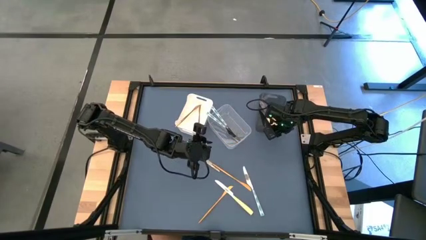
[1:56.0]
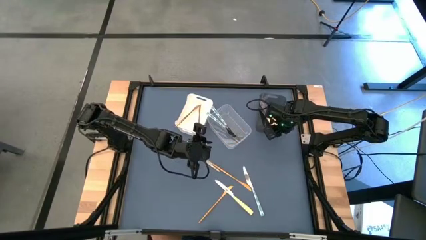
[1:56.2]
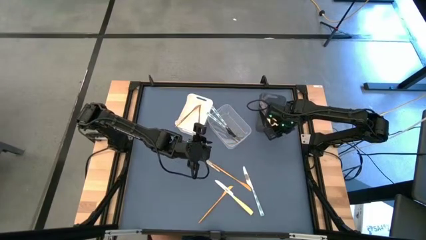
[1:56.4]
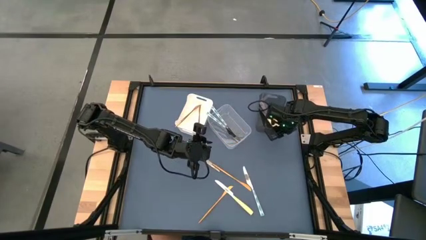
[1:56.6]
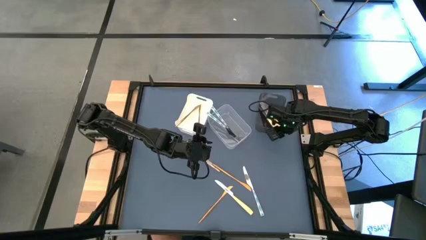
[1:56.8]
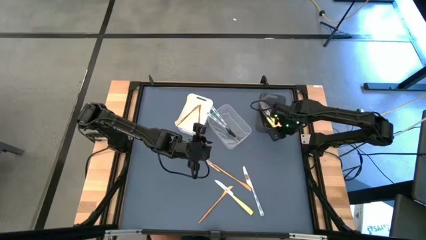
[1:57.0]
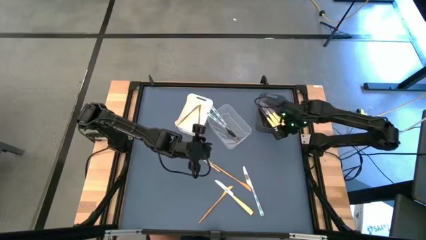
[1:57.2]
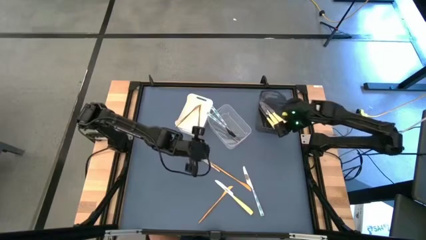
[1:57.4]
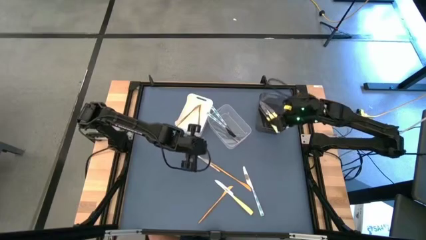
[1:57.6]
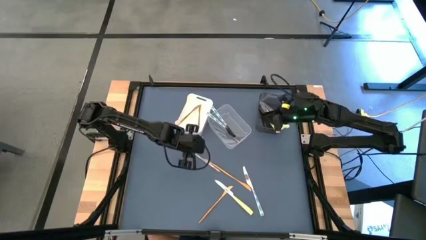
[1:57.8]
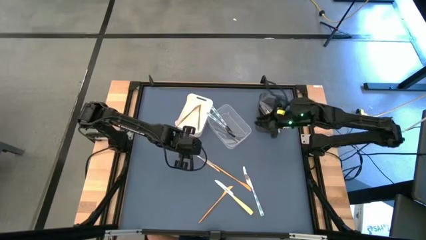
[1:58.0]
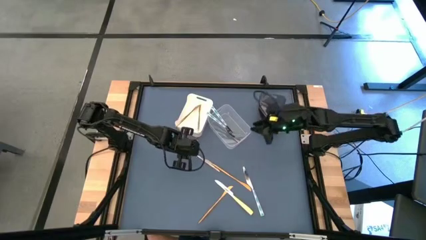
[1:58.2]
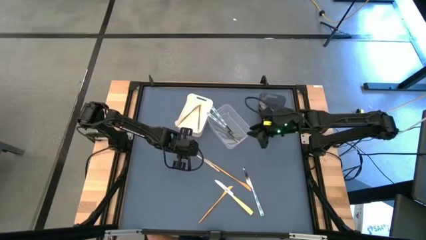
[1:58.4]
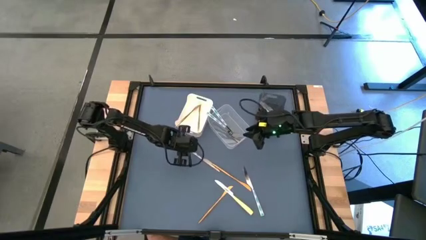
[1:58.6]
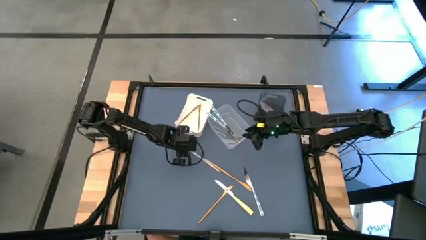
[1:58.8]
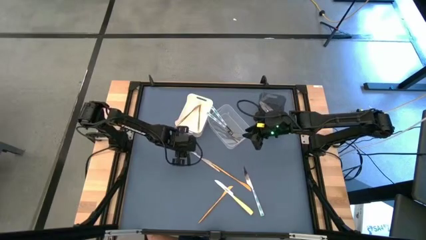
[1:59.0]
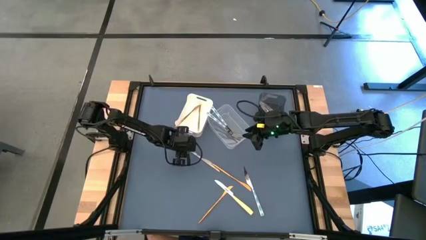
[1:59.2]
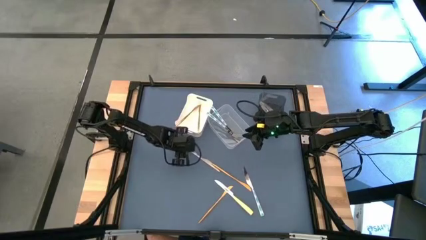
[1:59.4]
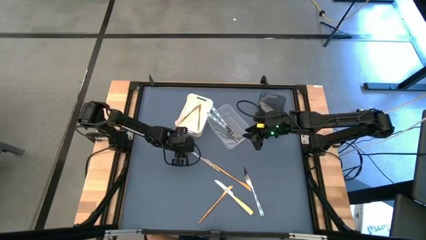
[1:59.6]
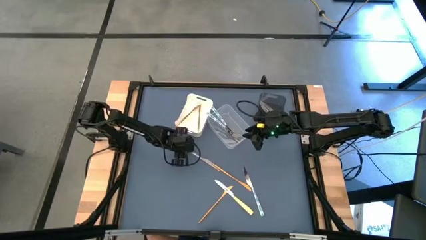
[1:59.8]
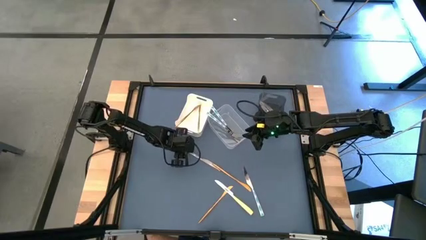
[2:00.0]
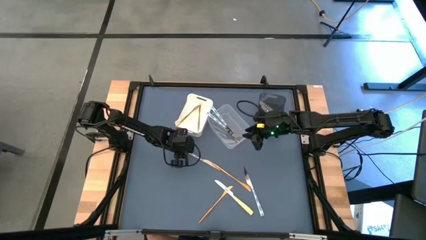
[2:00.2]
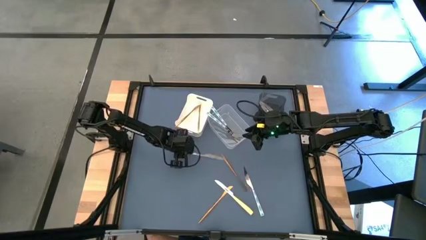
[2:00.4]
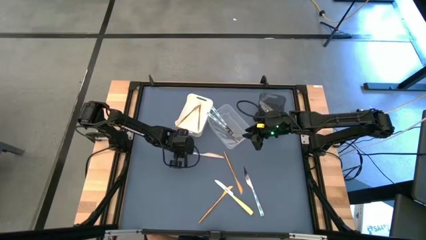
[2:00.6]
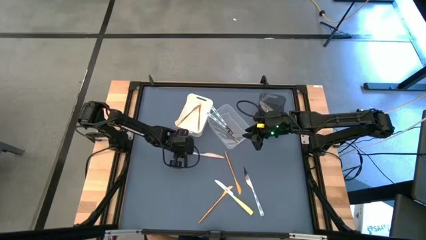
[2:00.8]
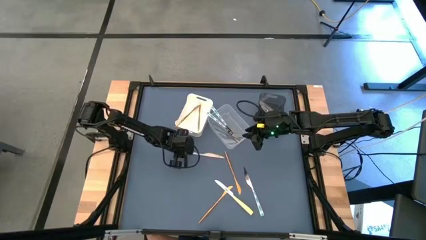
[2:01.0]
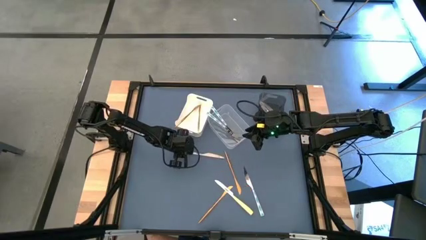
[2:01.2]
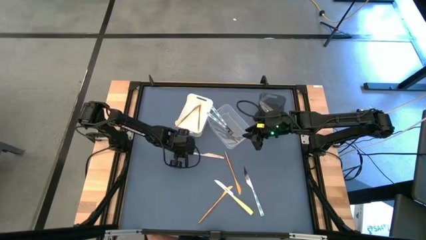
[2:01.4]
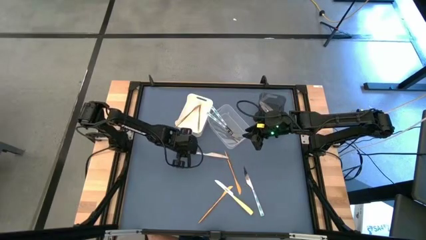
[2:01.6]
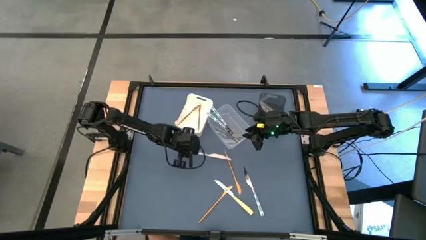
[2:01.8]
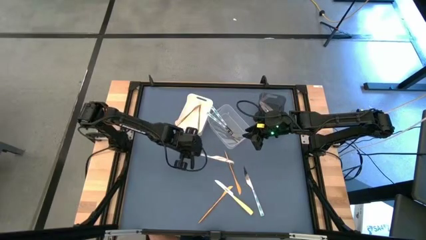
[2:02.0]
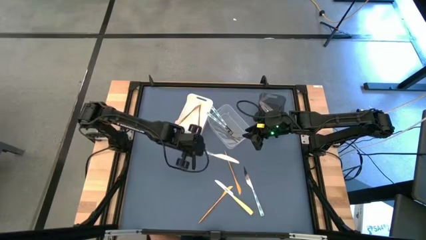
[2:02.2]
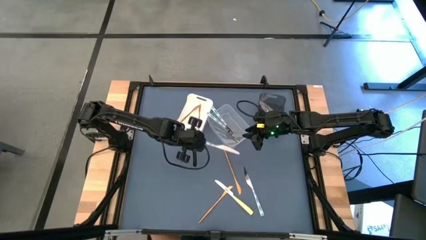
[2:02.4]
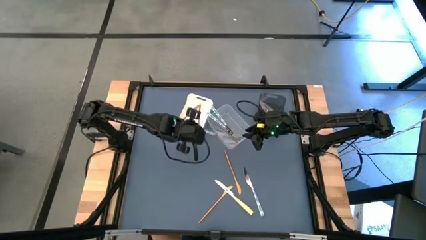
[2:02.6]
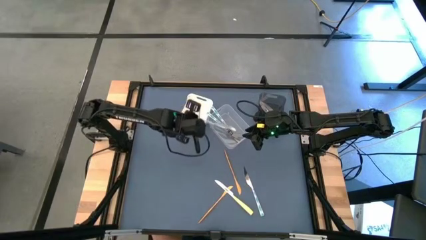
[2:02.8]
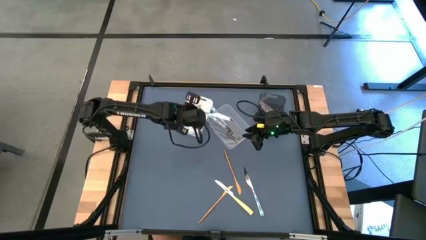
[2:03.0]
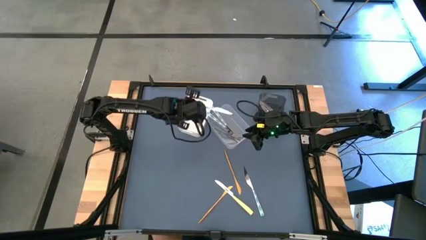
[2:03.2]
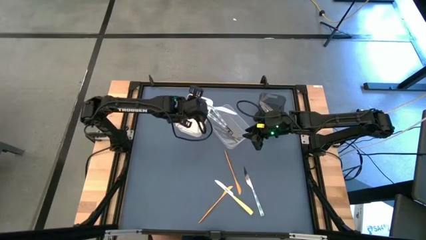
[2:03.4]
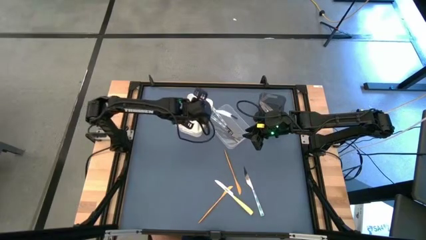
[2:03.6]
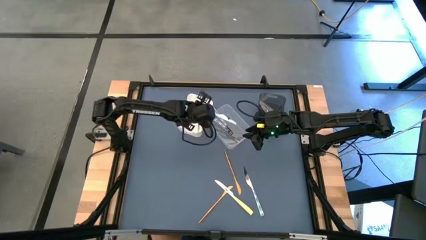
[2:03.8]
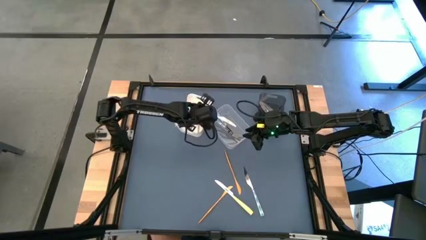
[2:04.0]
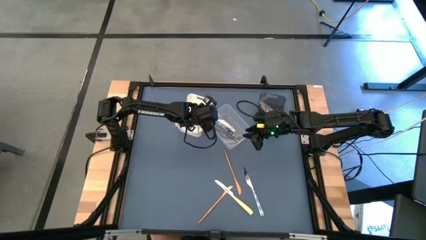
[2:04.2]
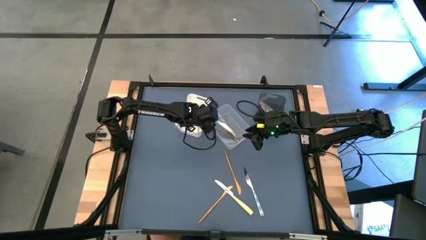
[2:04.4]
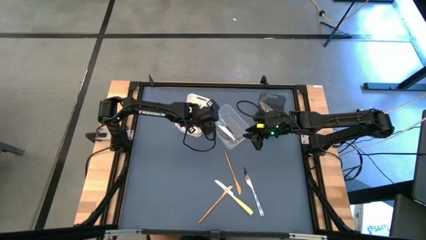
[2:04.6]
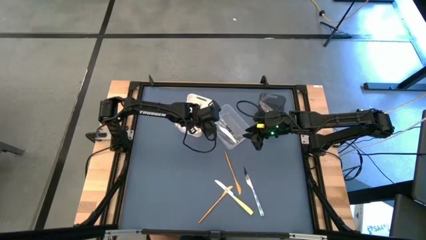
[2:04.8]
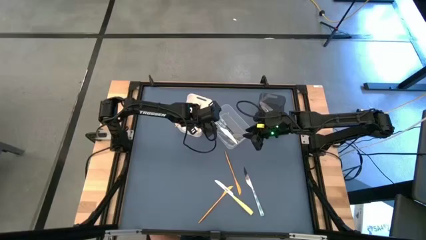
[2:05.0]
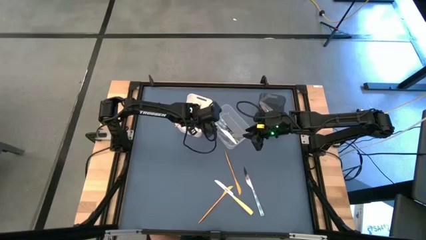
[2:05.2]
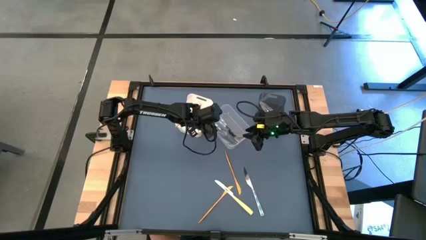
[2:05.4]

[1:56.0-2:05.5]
Task: Sort silverware by color (type)
Put the green knife into the transparent bin

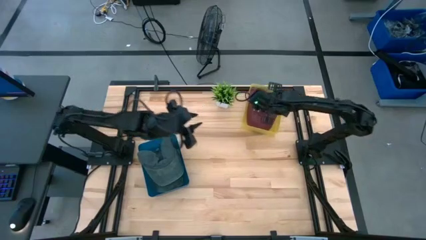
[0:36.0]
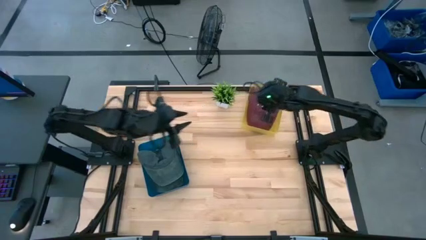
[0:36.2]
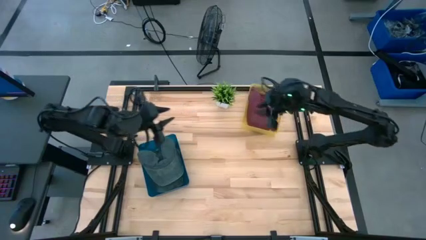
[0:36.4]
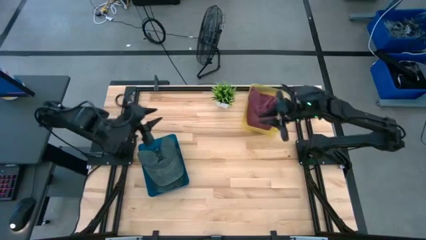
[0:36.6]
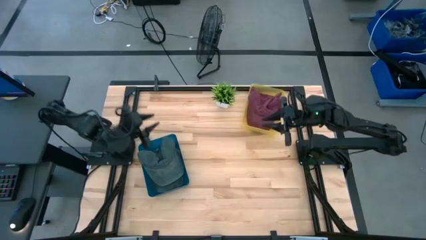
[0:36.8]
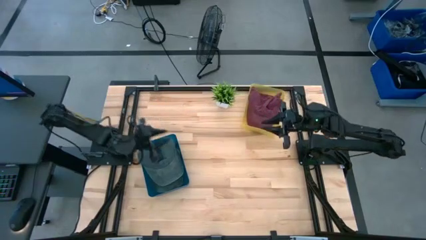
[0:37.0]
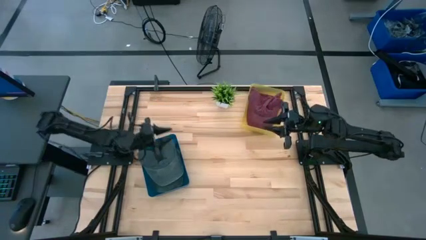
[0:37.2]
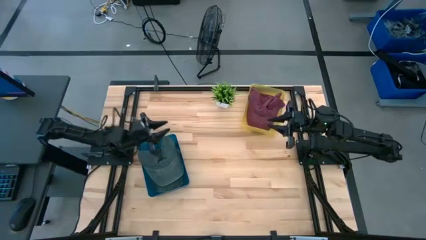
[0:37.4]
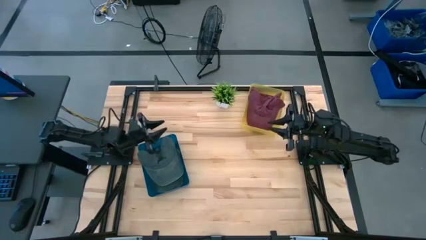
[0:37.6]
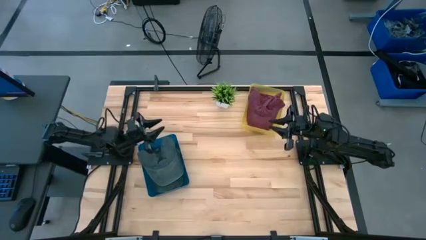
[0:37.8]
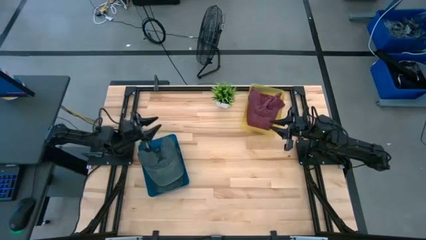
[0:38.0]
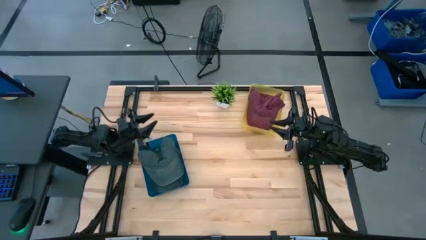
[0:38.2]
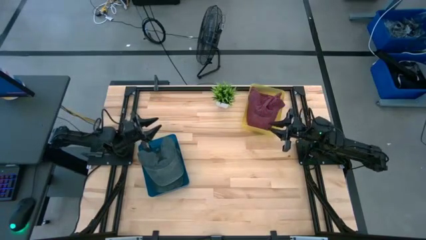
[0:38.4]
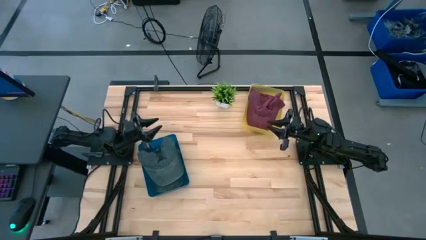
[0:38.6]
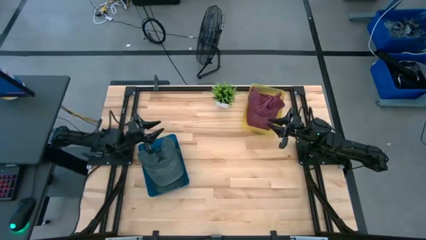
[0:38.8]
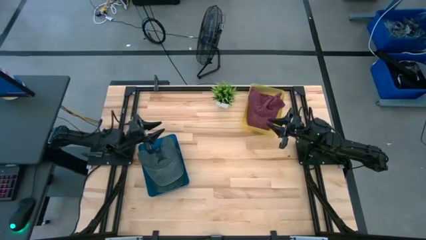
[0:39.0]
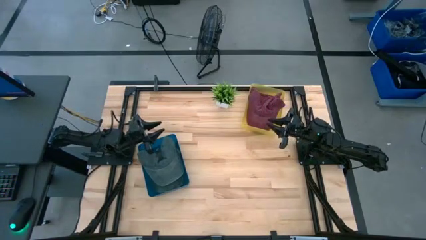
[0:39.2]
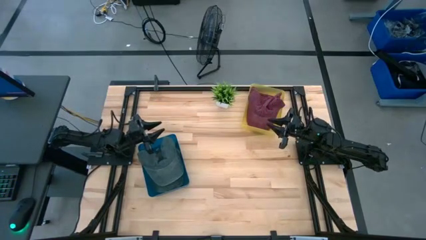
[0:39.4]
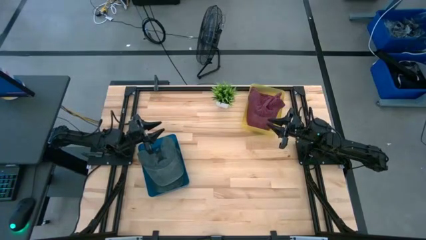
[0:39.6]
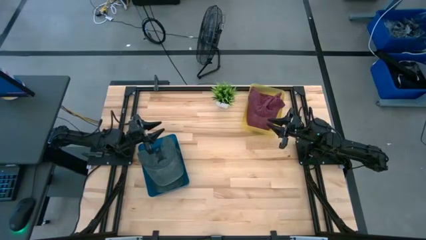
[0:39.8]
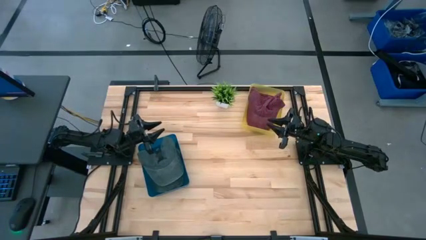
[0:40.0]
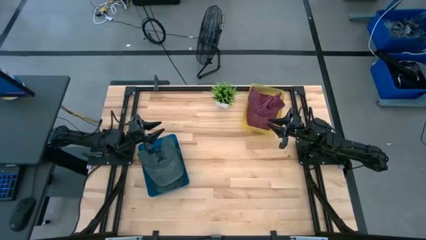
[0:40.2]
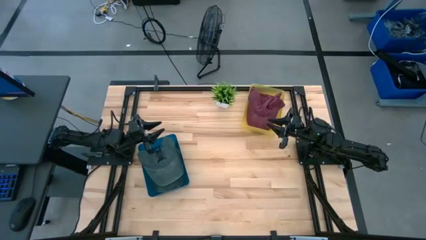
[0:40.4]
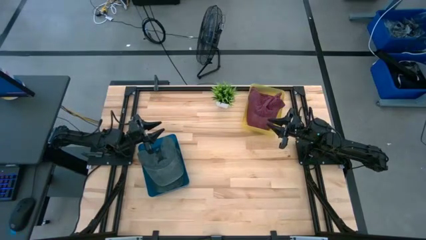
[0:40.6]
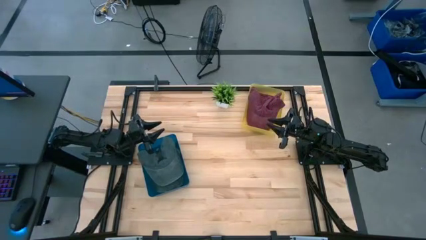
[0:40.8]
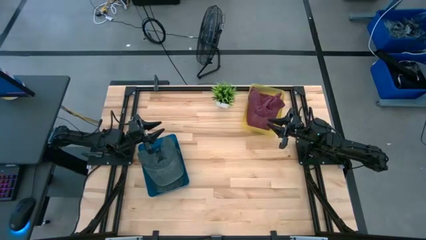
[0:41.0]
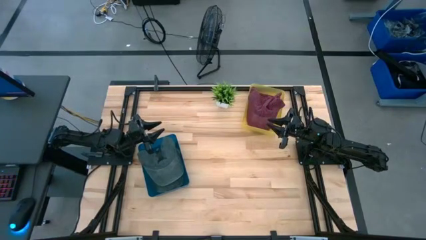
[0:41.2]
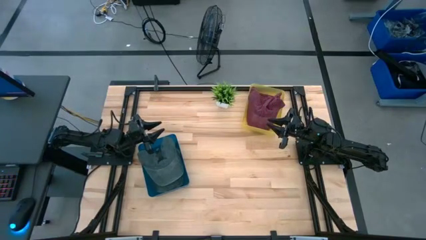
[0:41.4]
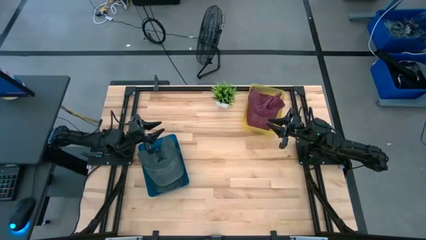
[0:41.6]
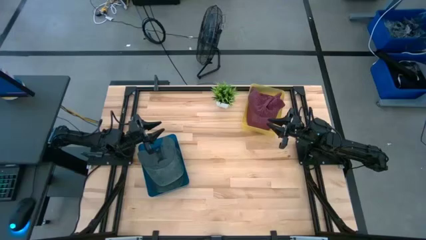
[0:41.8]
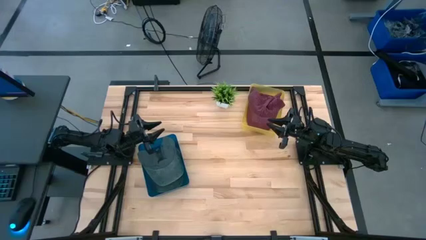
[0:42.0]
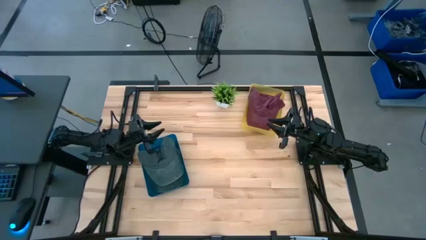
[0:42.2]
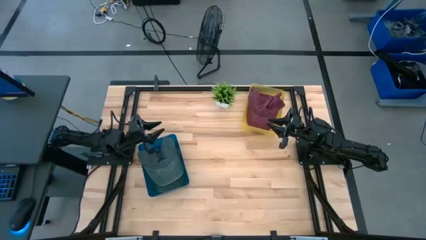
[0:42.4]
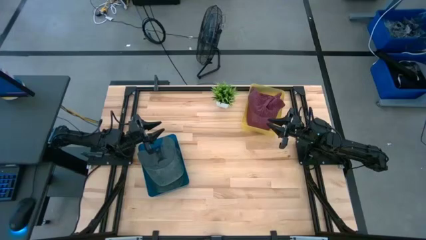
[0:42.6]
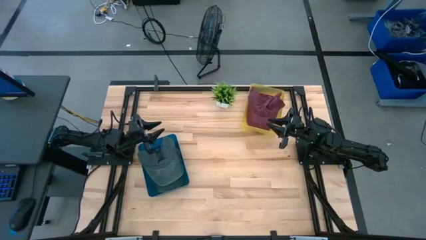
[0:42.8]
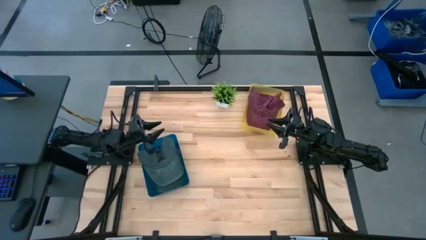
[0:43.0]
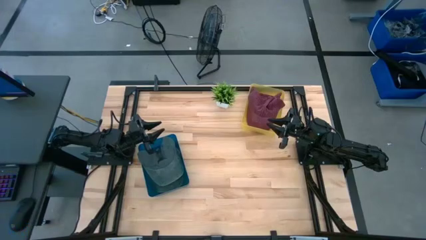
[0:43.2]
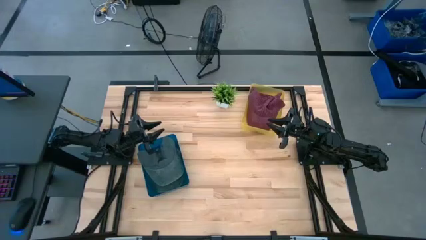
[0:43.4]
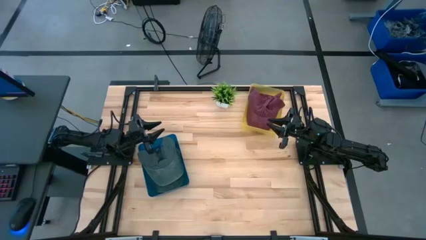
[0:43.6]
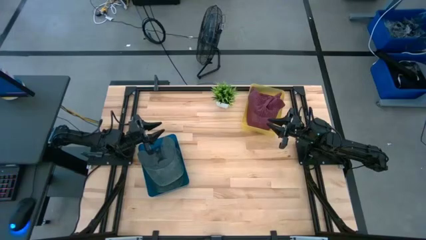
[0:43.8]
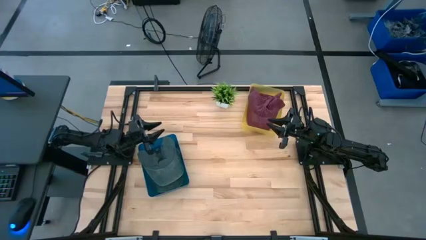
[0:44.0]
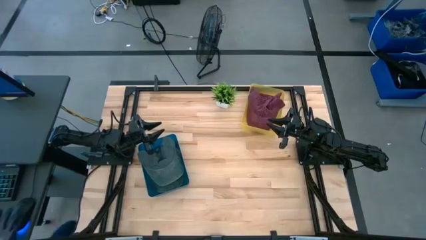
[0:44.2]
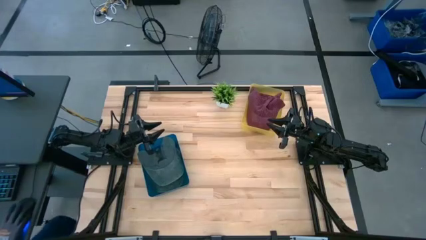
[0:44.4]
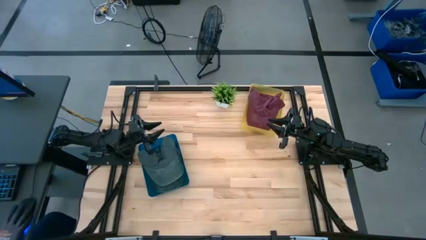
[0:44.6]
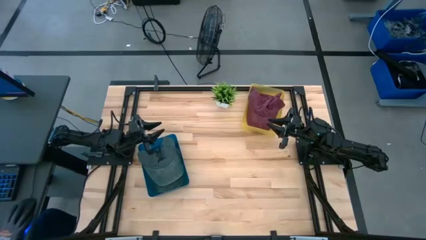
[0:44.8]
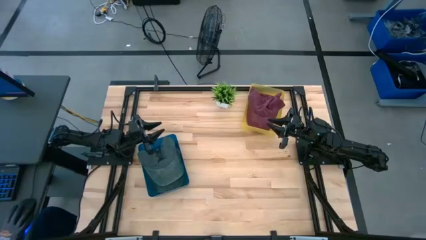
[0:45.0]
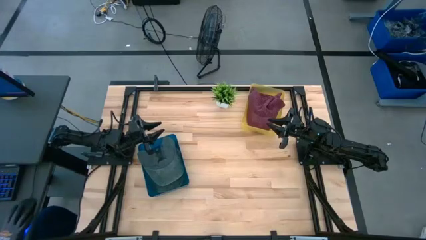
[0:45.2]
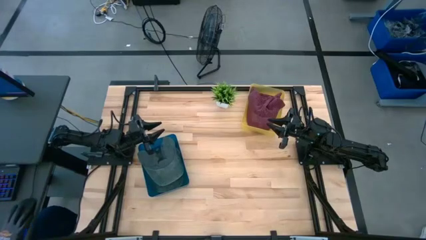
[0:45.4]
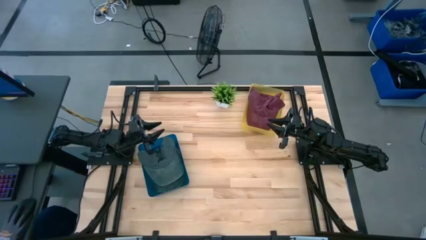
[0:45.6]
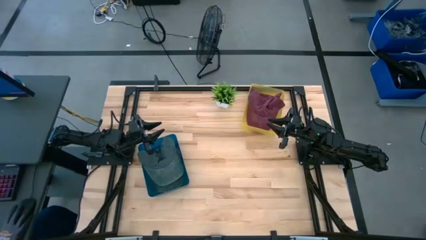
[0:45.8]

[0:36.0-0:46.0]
Task: Pick & Place hat
Return to Home Position
